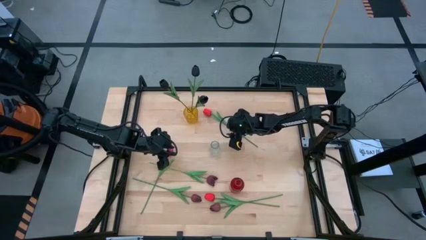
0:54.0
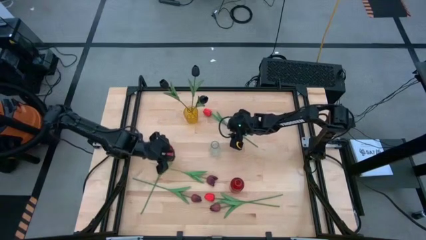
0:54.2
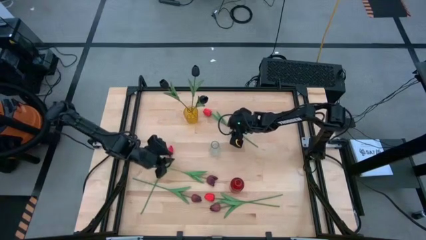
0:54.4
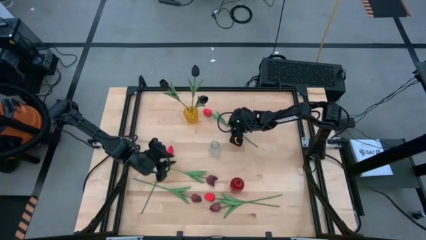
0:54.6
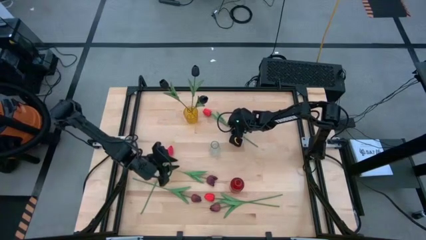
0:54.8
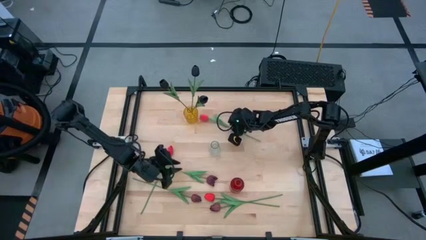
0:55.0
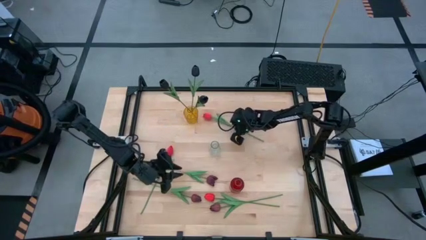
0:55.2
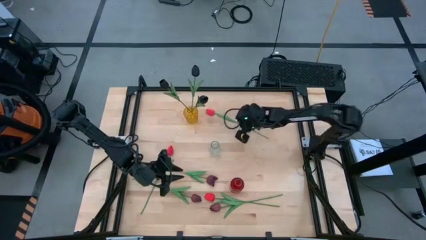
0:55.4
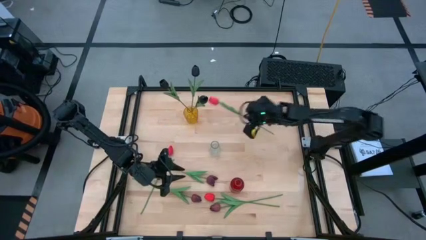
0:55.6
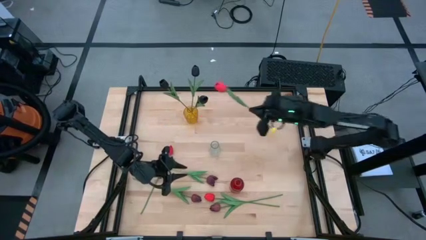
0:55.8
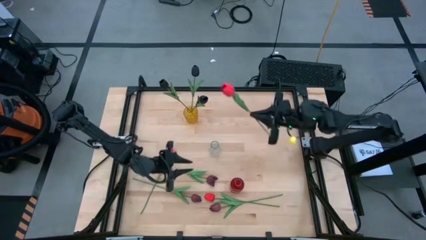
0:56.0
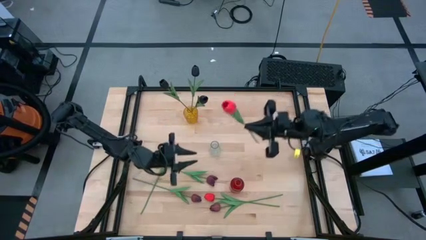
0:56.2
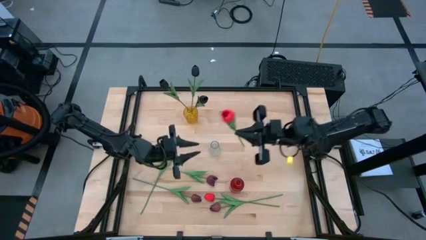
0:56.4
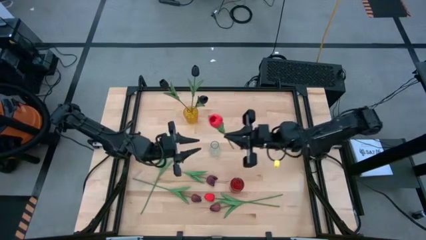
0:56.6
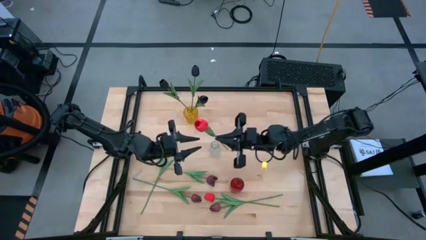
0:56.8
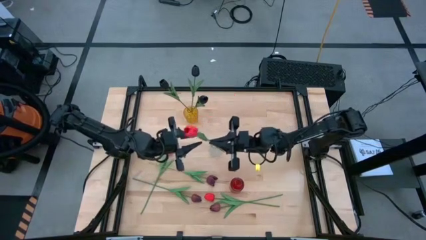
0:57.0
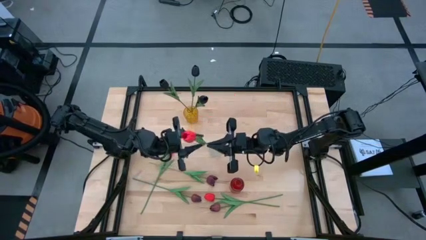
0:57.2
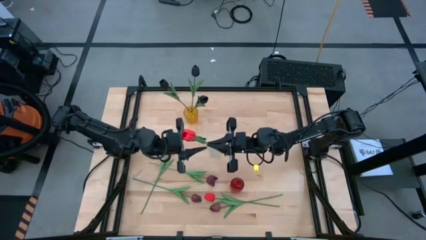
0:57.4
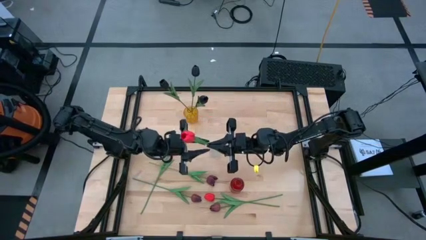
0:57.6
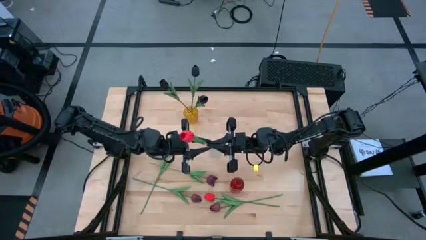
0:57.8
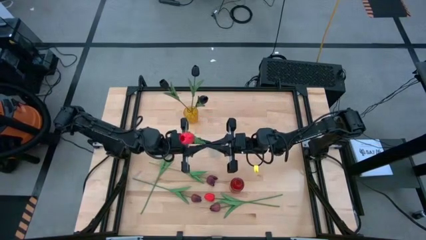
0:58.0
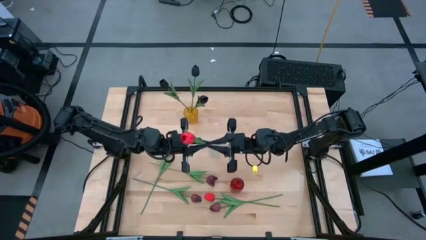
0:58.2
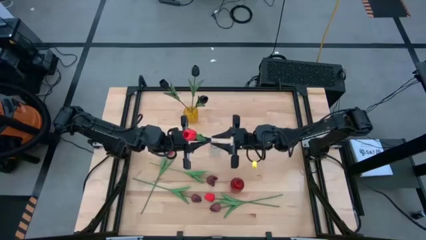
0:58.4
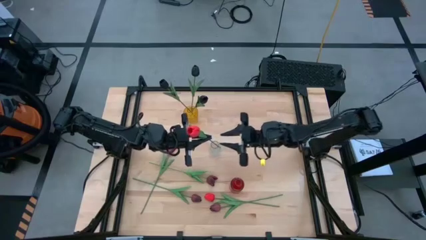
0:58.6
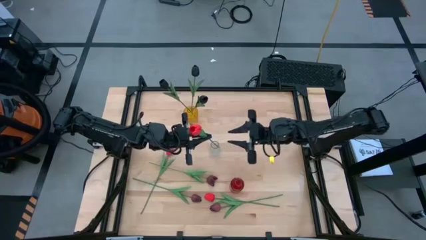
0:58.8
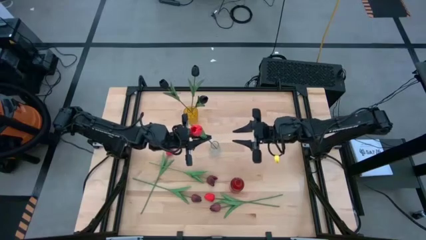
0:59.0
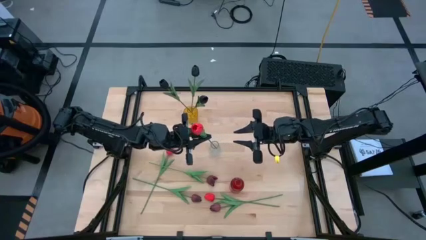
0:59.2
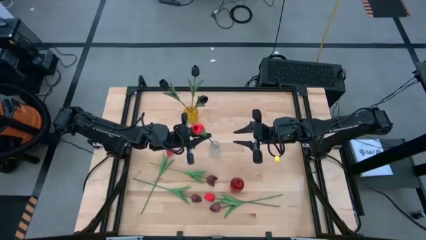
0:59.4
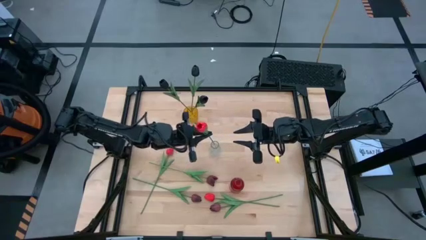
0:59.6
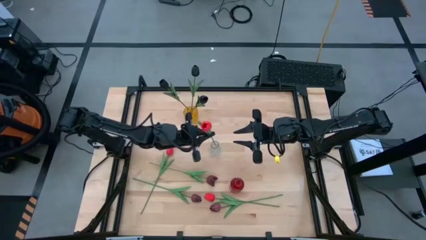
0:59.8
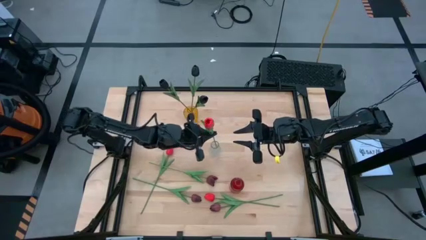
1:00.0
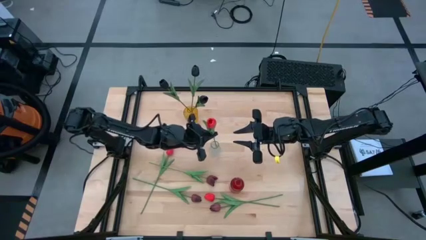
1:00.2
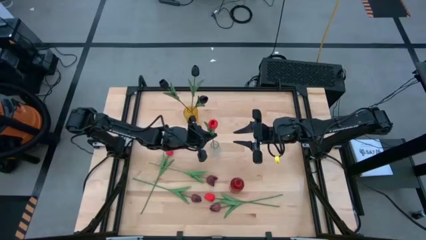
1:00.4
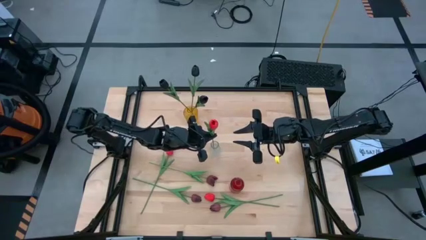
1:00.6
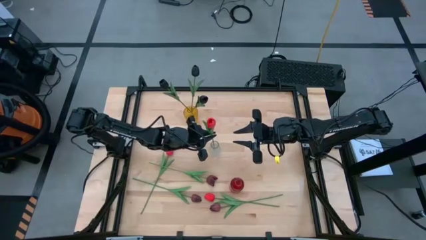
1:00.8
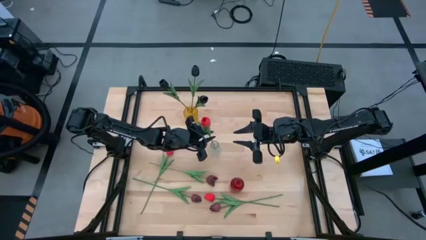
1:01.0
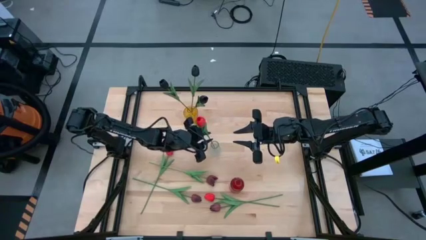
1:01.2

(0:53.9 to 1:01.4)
Task: Sort flowers into vase by color
Put the top red tulip into the transparent vase

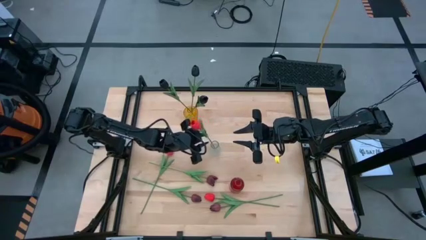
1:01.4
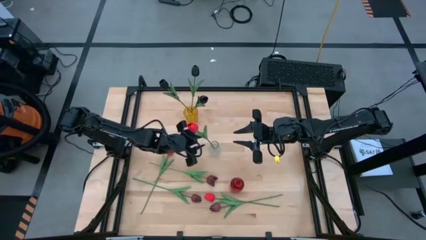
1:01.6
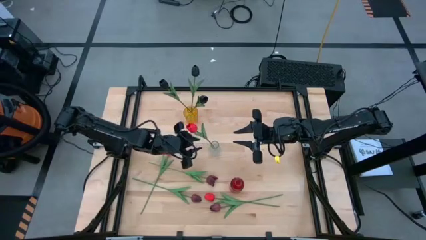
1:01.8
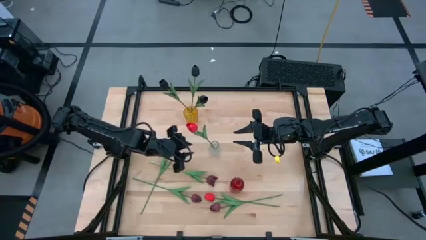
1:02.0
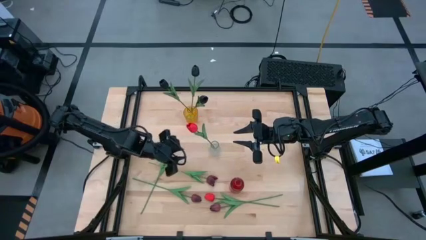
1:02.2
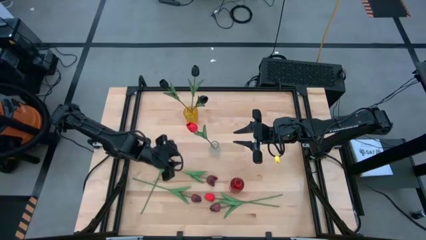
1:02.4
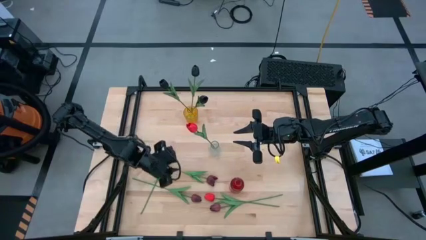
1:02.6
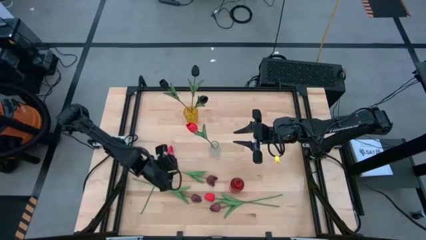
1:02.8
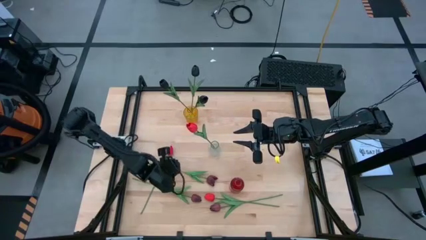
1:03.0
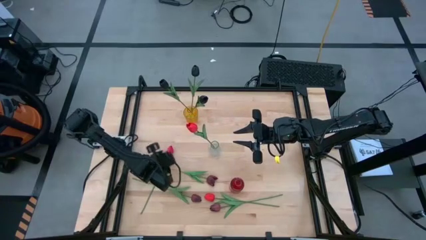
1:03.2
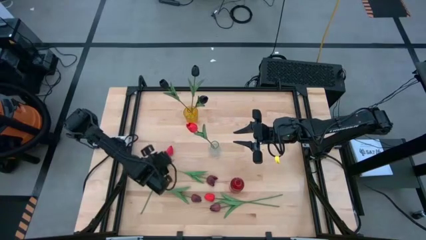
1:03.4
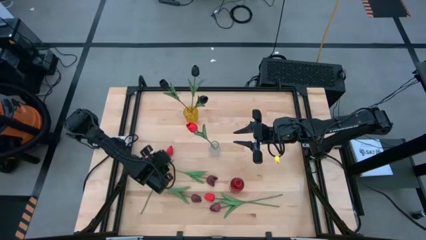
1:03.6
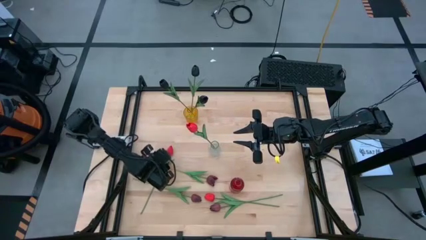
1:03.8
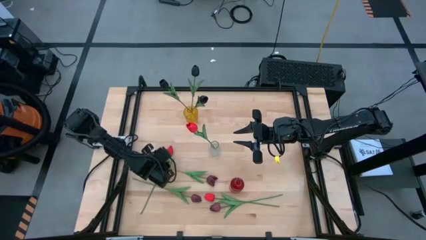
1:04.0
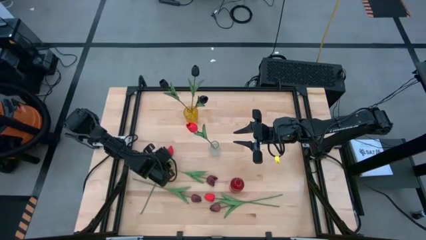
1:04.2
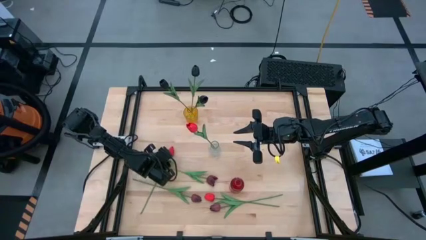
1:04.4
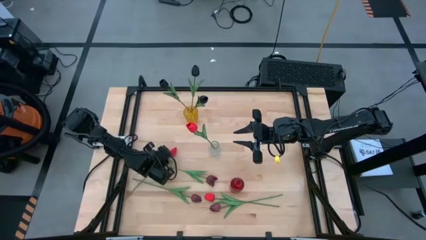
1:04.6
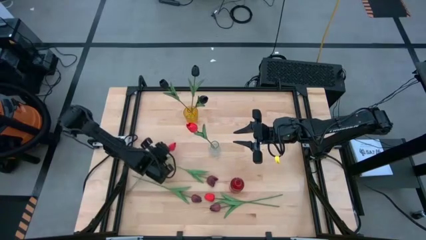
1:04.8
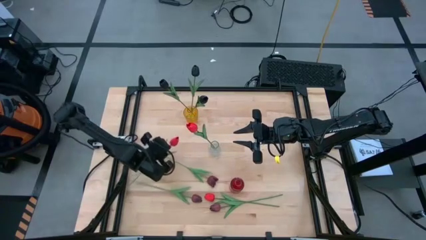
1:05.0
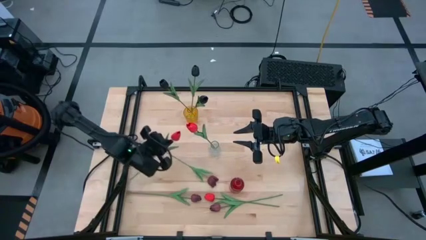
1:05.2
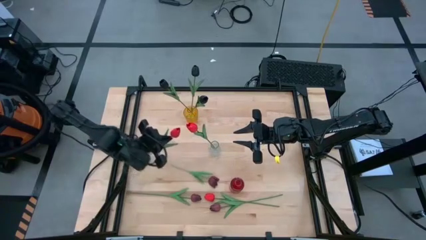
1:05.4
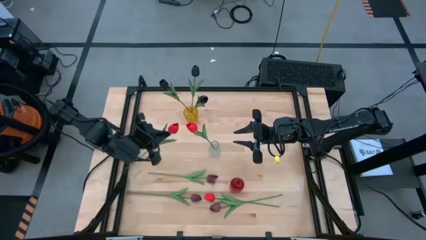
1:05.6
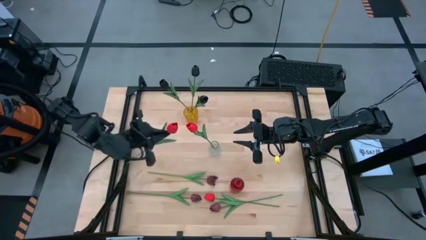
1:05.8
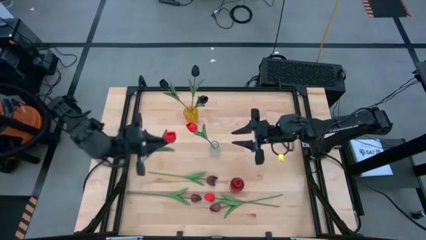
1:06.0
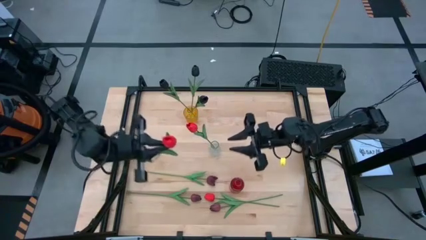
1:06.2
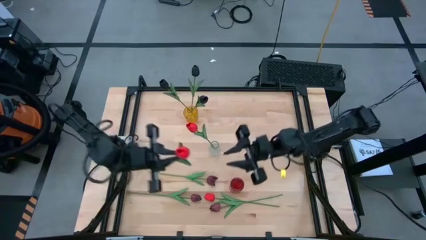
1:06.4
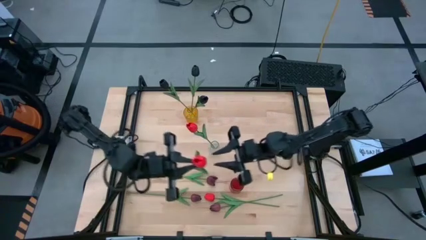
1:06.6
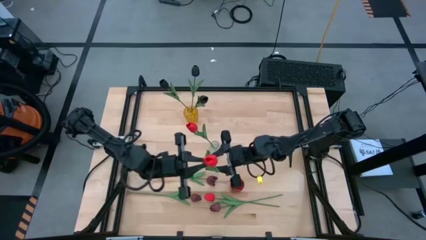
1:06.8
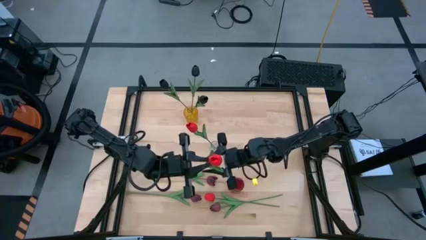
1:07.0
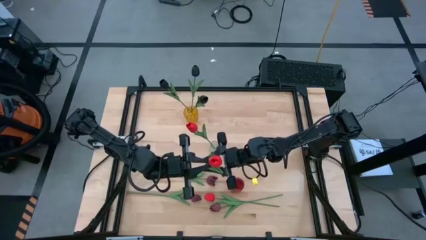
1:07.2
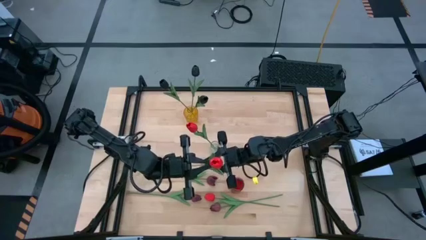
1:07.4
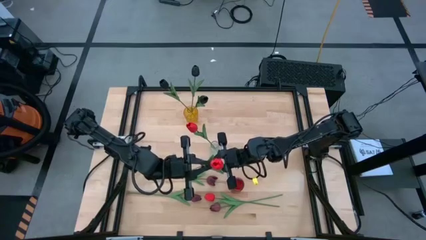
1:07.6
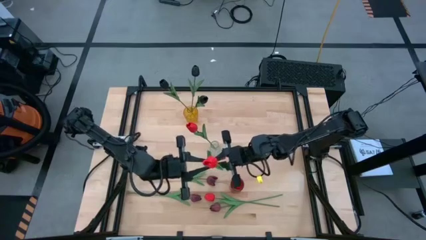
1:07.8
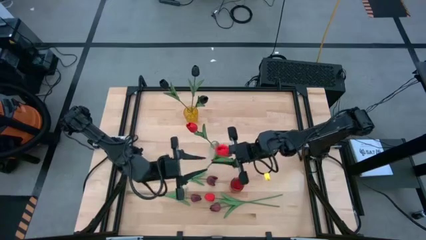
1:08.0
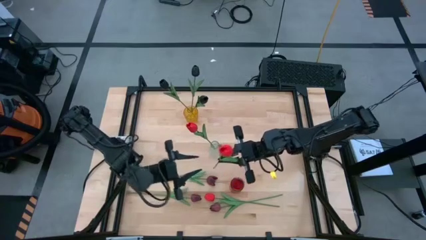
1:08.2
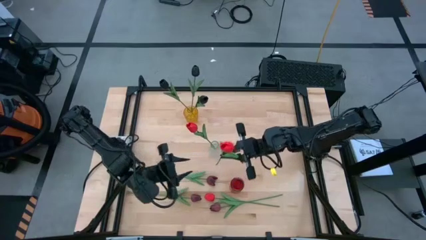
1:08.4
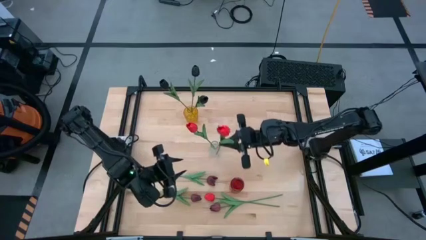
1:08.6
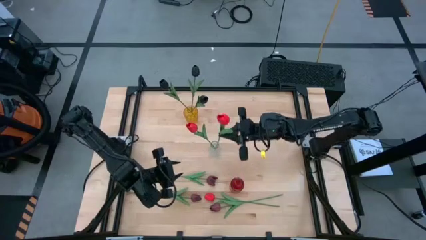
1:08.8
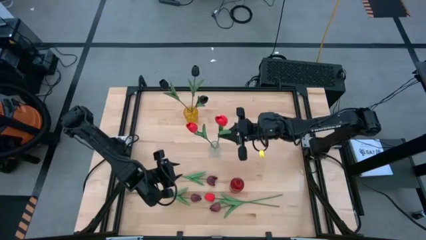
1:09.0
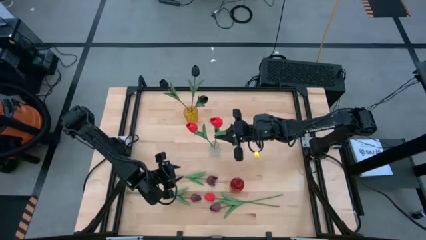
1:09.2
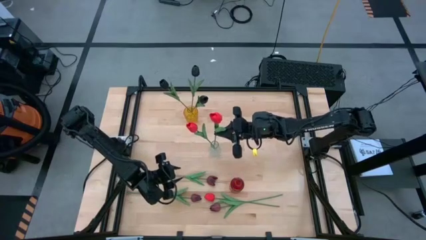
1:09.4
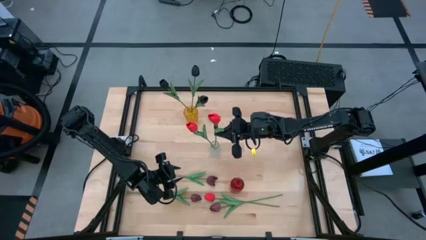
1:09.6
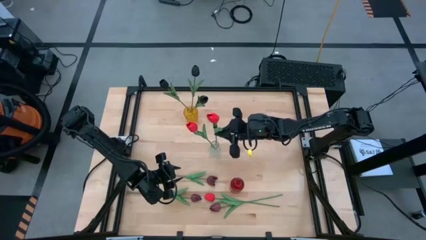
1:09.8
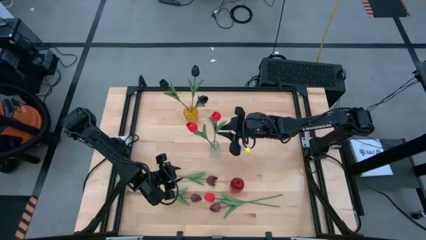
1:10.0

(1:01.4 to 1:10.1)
Put the left red tulip into the transparent vase

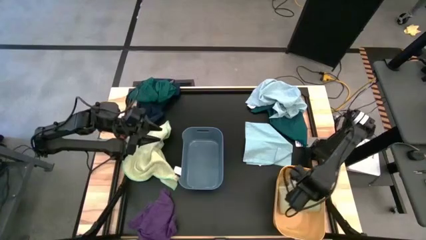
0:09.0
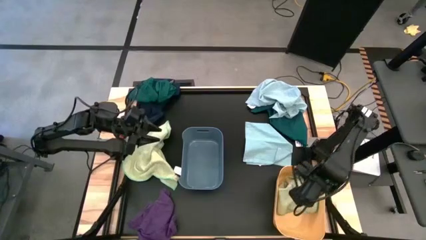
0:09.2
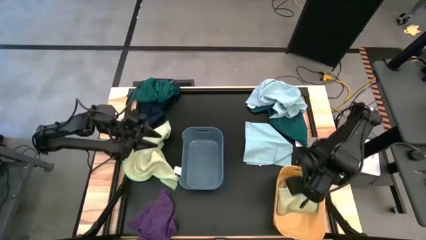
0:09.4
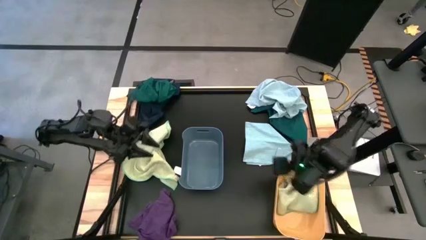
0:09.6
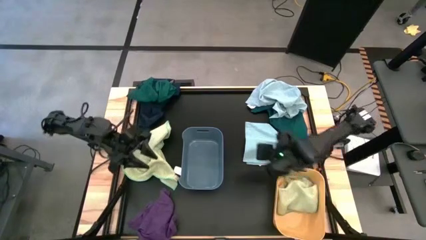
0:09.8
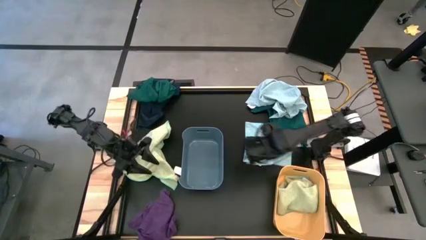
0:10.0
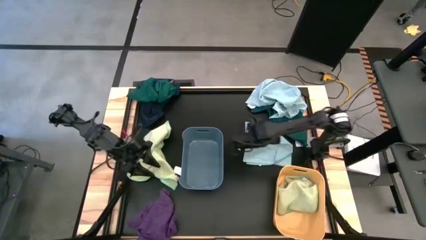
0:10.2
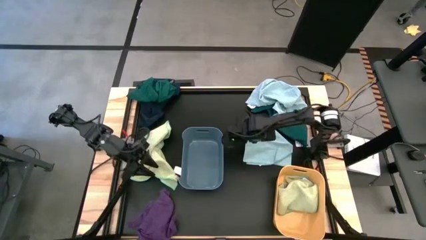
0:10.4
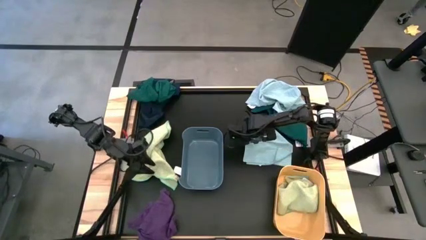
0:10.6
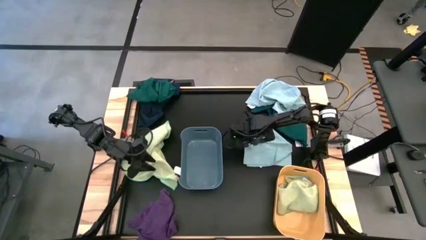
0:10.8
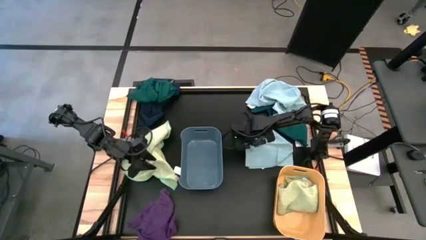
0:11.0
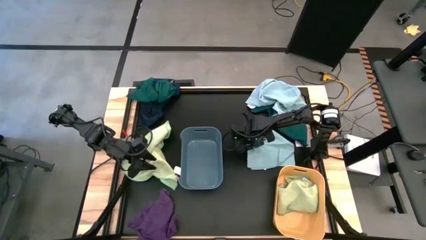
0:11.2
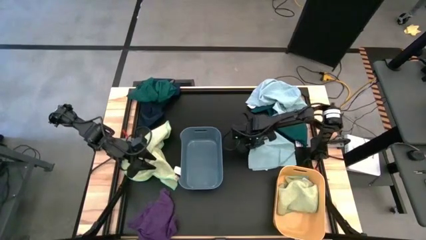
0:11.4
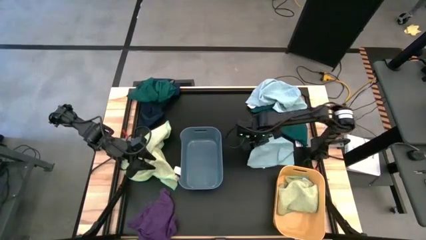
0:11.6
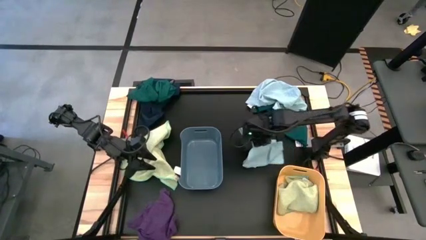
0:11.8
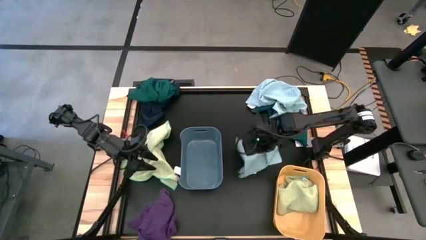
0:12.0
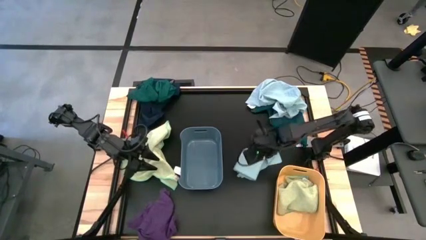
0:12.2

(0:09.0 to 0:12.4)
Task: Sort microfiber towel by color & place in baskets
Put the bottom blue towel into the yellow bin
